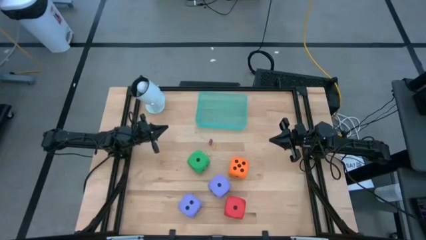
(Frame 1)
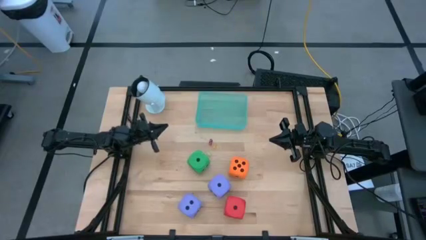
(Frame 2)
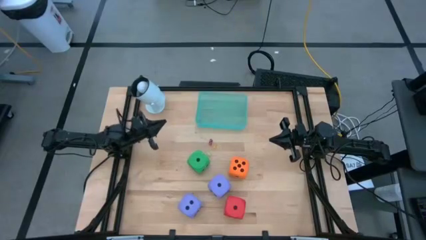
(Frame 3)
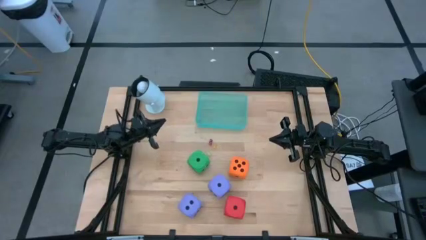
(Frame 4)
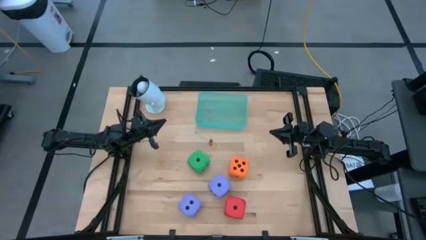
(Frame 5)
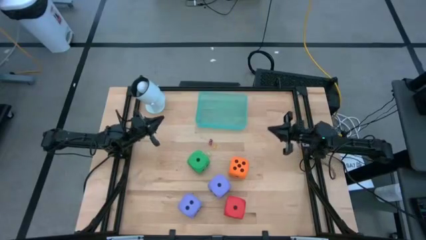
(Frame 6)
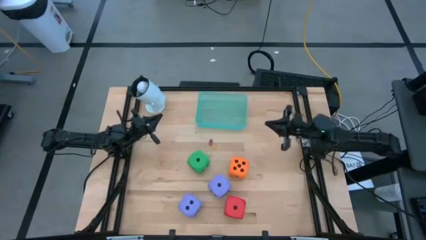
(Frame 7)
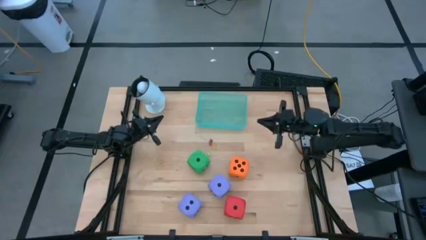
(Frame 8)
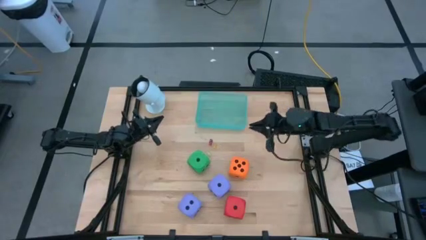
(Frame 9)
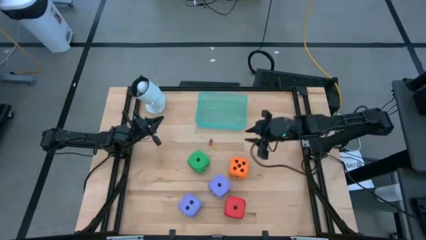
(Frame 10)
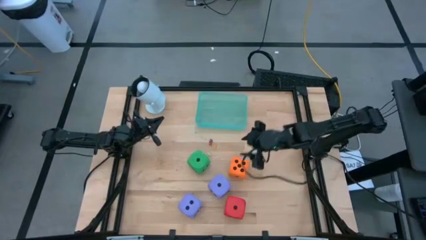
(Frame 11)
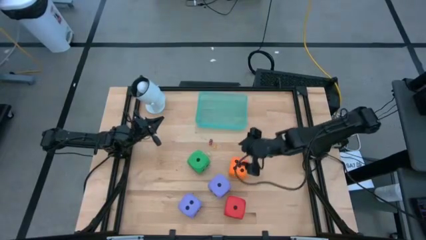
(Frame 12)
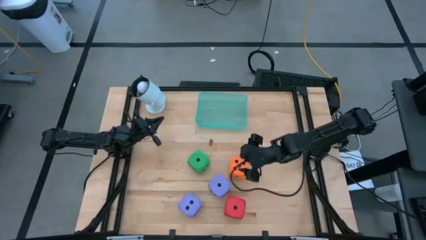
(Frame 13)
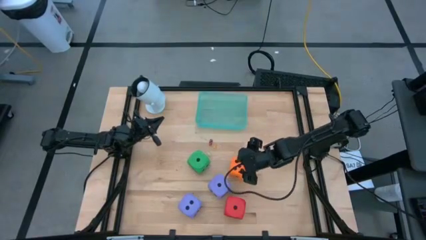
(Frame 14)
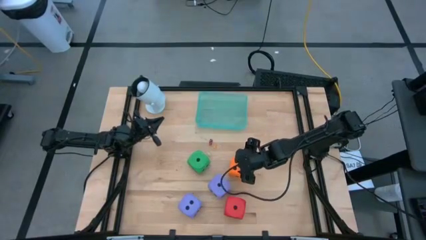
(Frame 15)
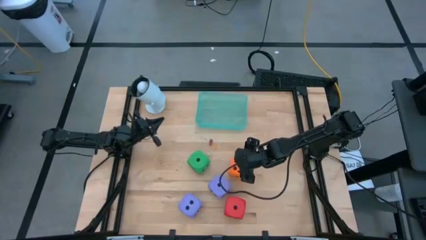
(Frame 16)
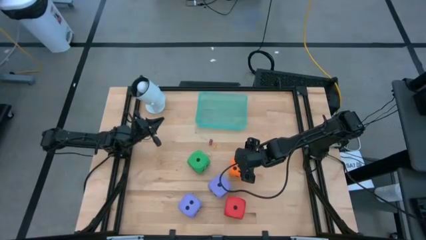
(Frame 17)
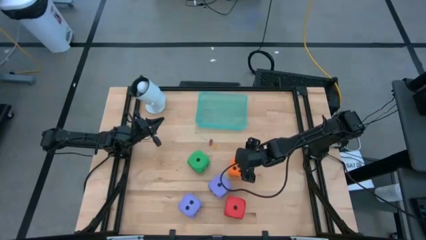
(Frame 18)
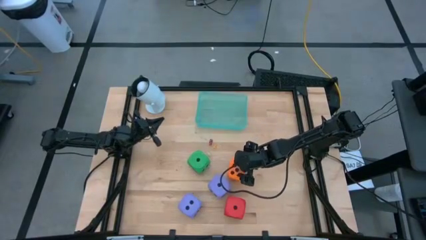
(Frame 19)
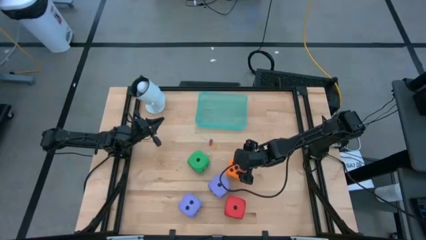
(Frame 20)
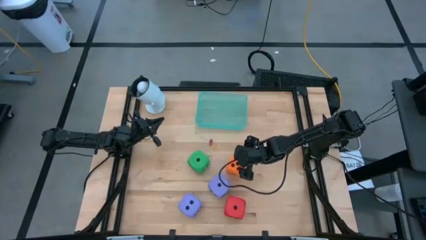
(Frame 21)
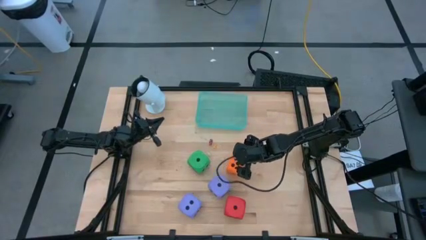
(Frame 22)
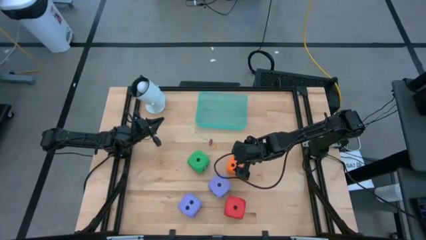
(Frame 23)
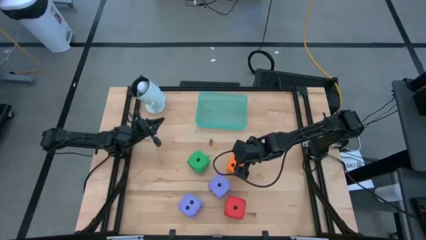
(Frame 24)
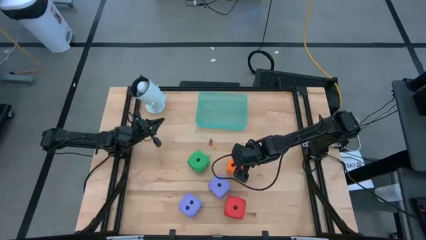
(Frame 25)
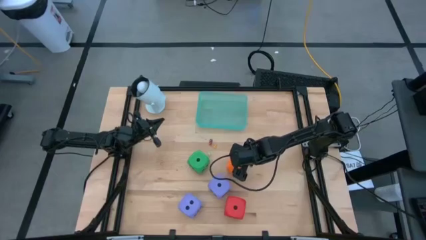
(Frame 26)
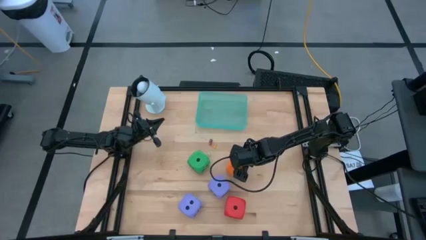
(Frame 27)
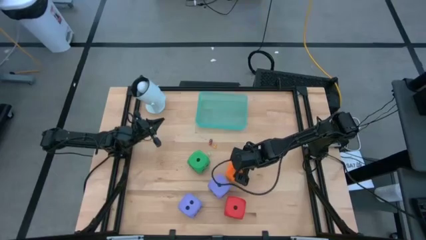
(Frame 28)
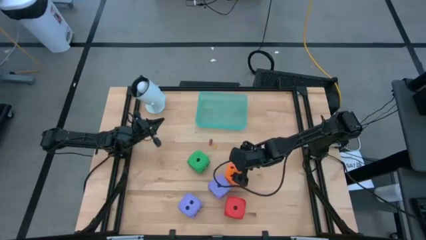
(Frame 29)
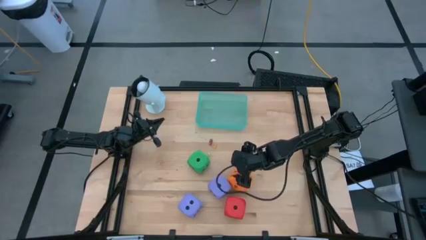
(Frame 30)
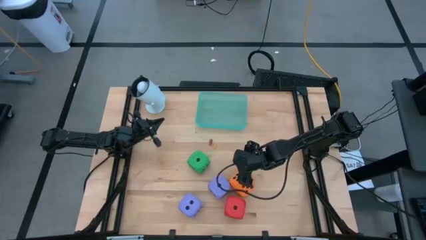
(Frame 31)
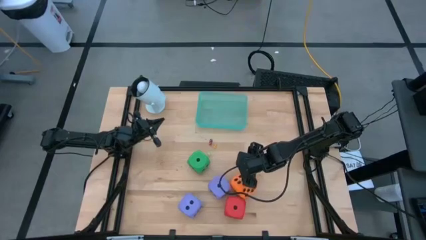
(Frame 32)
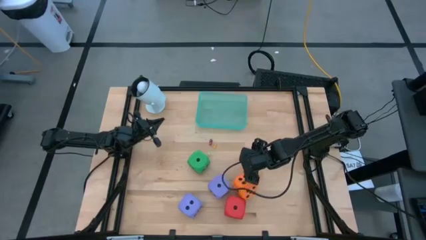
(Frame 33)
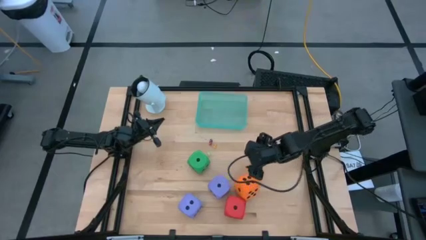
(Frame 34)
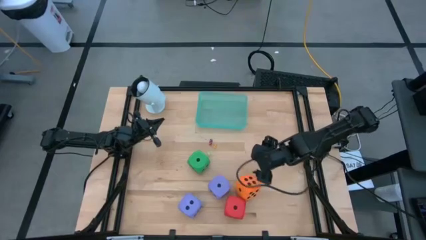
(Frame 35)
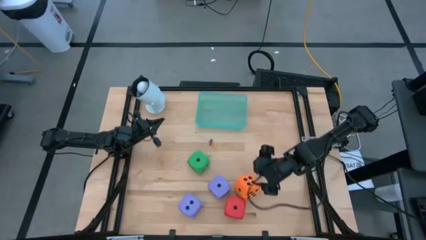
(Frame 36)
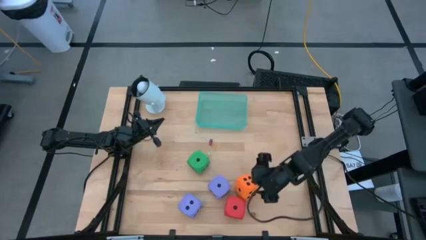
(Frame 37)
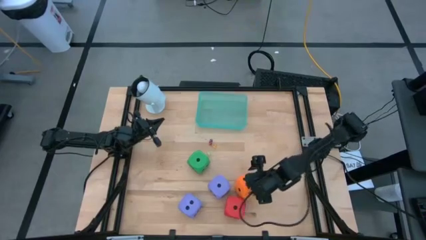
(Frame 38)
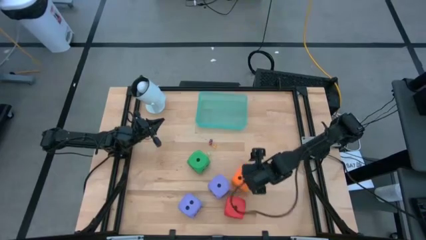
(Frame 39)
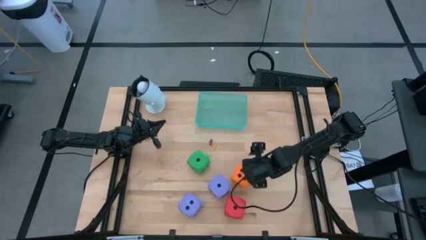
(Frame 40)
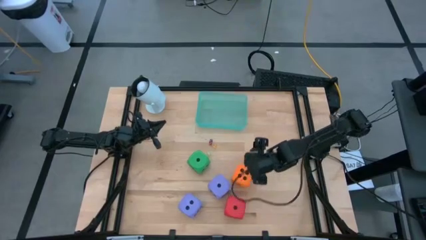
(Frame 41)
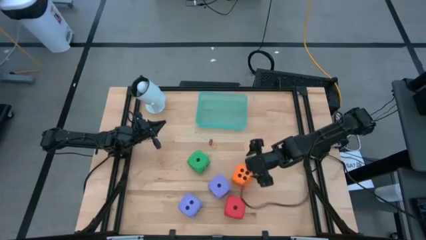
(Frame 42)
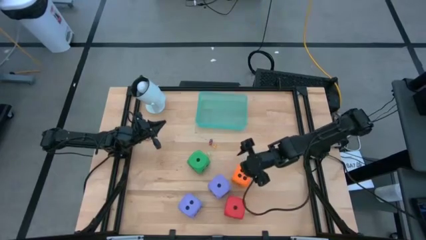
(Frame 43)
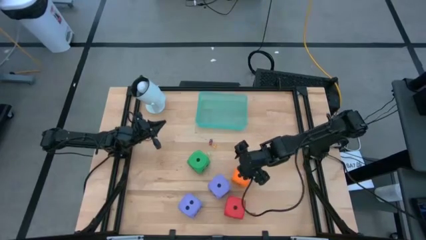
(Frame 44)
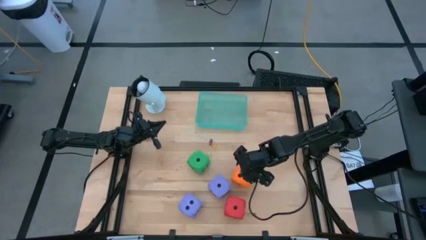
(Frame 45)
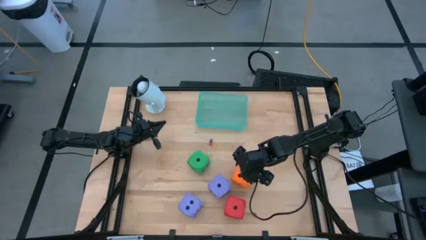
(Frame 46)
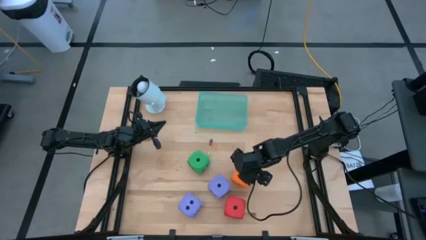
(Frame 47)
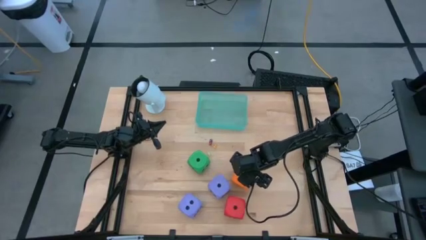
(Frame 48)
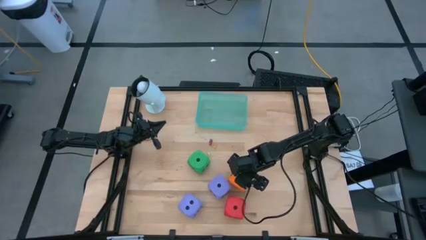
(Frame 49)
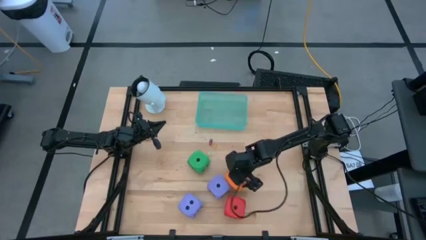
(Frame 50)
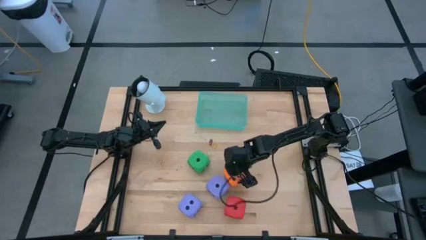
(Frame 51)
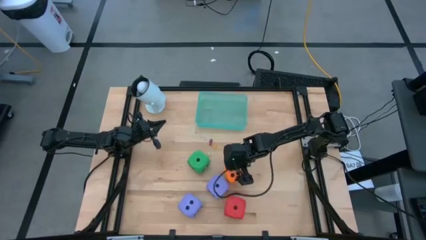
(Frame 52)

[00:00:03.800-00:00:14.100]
Task: Pick & Place Dice
Put the big orange dice into the bin
